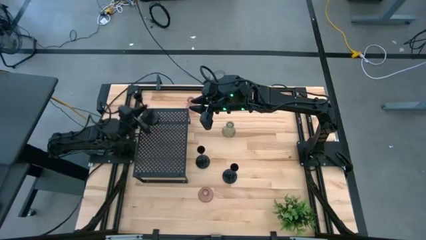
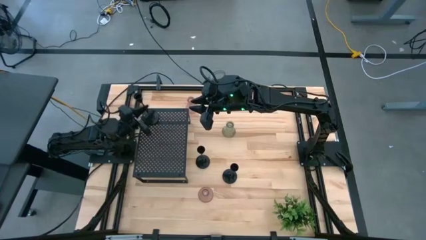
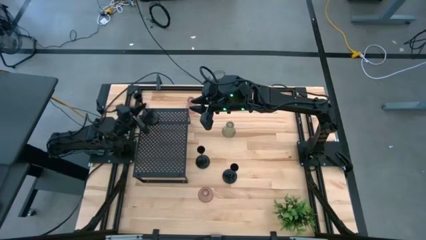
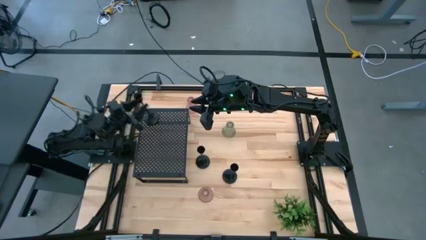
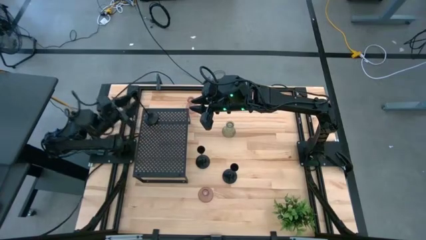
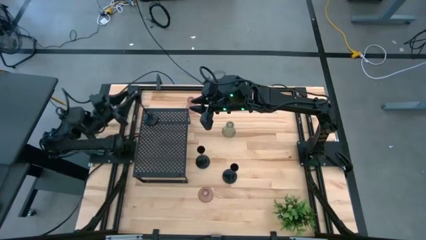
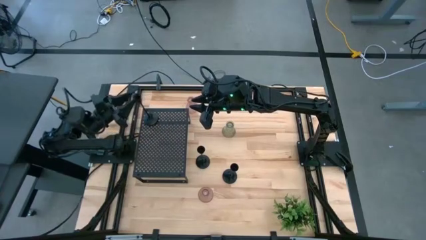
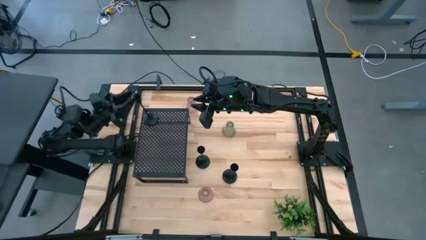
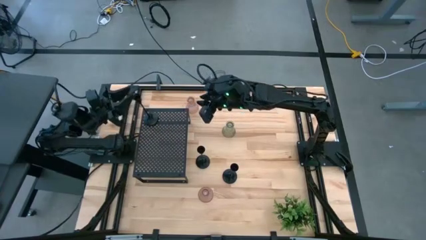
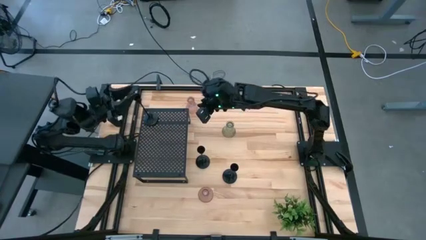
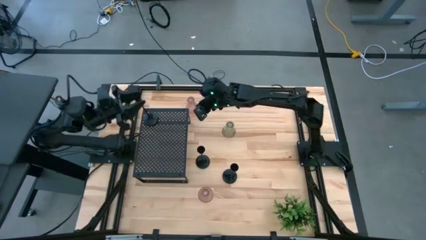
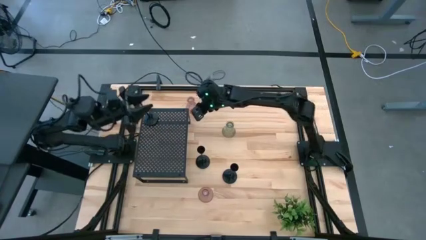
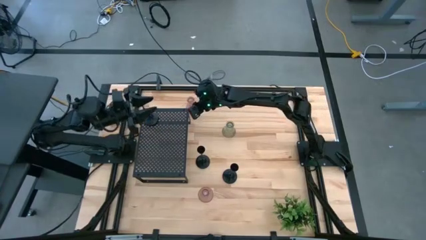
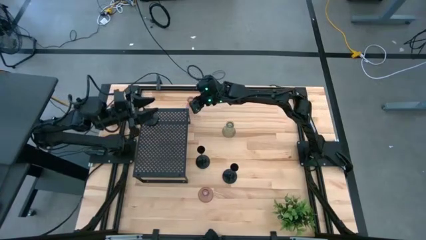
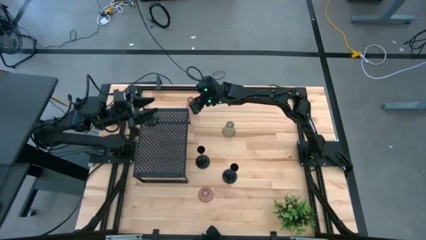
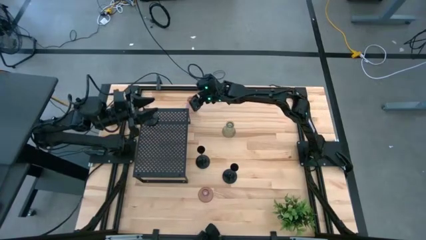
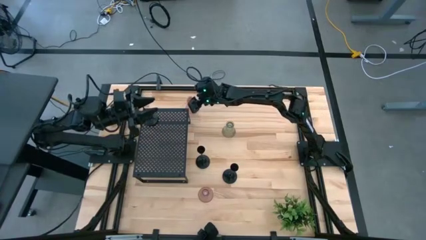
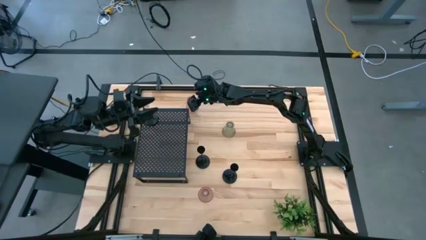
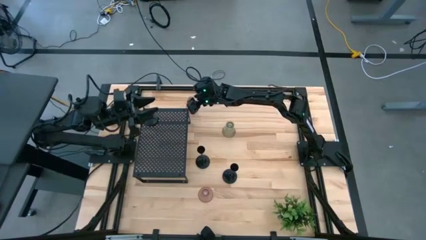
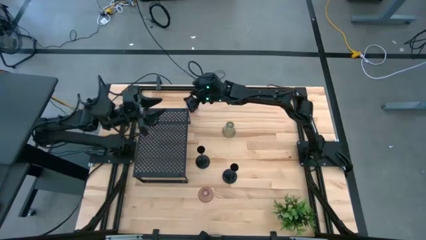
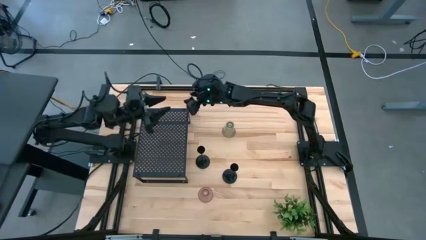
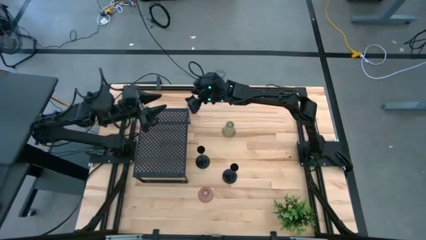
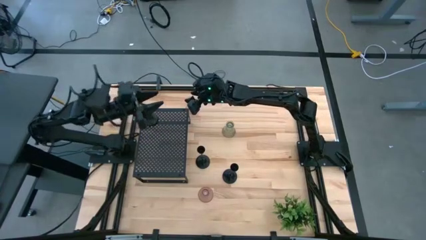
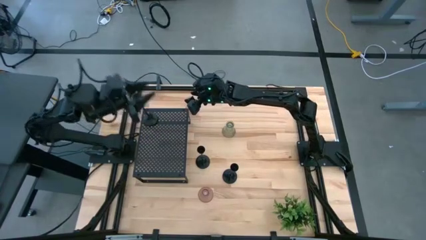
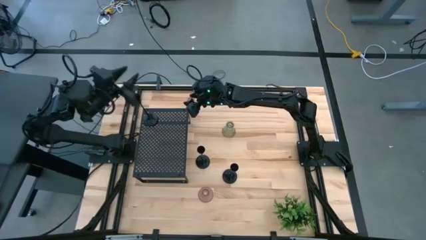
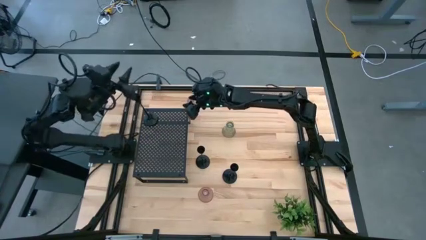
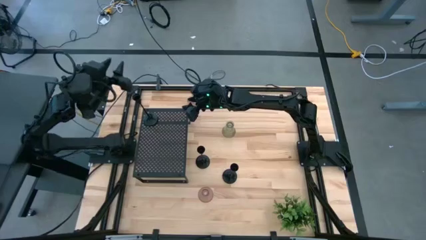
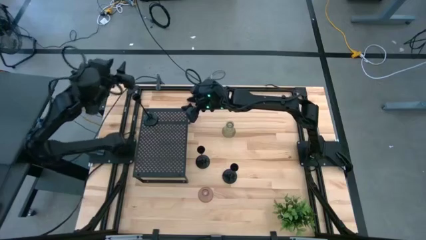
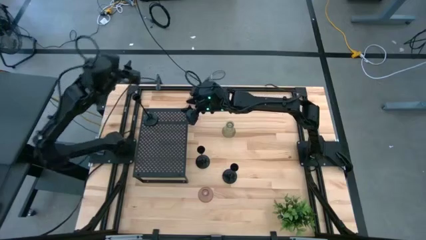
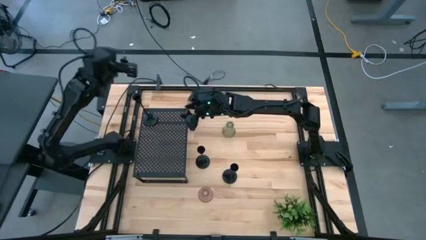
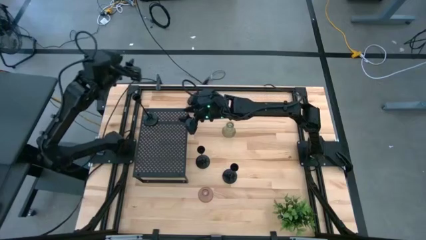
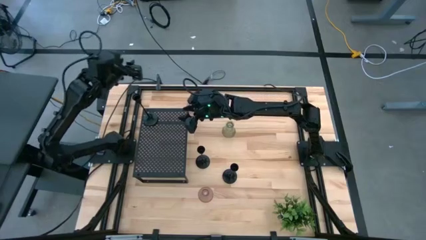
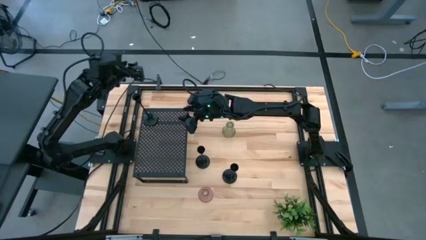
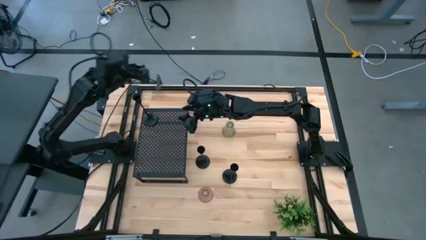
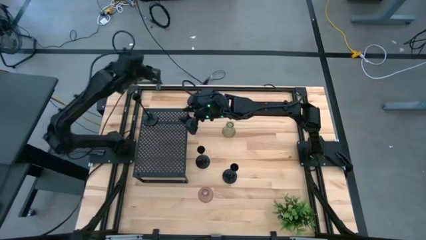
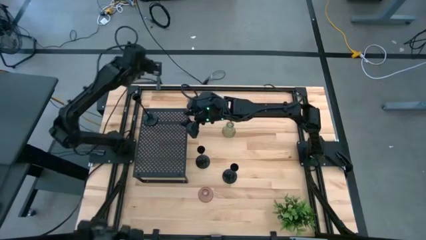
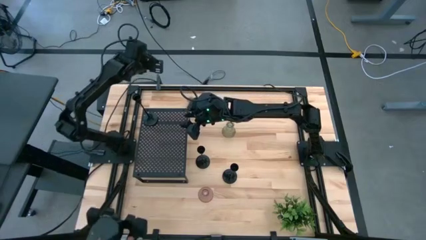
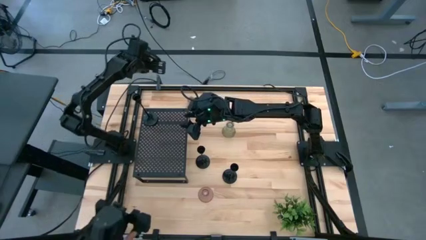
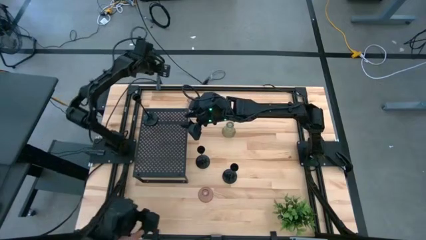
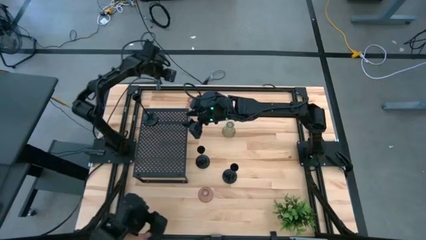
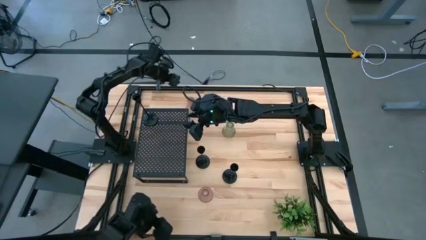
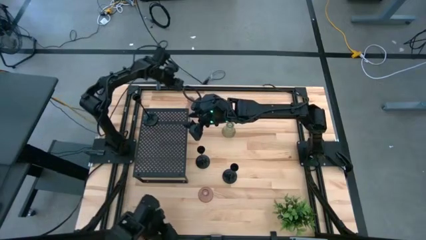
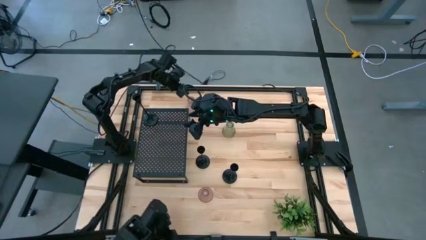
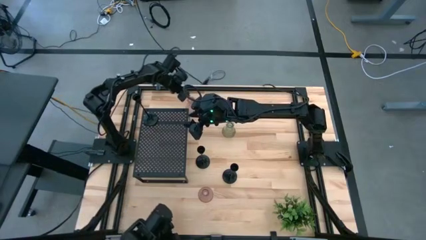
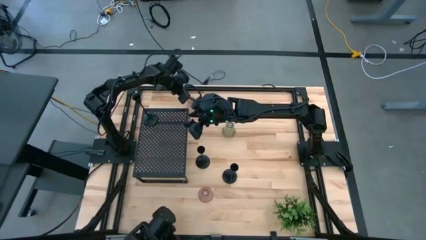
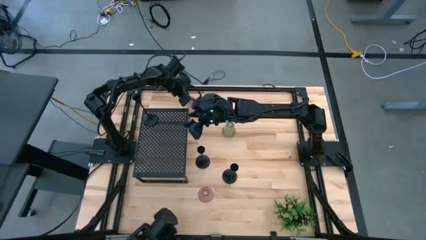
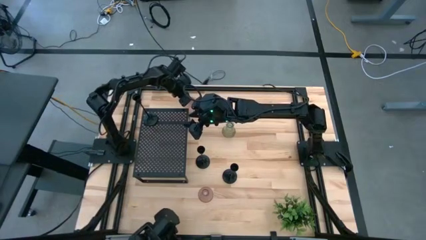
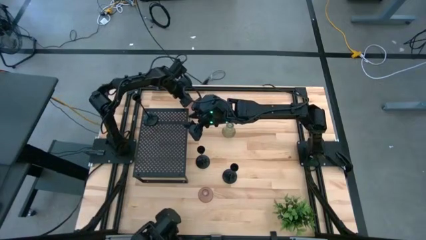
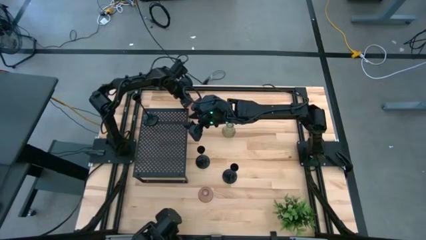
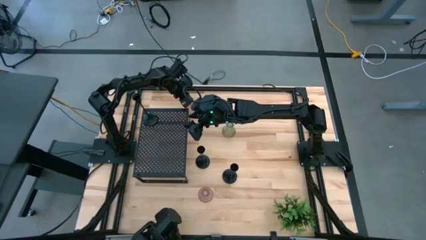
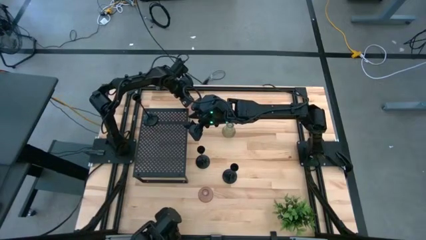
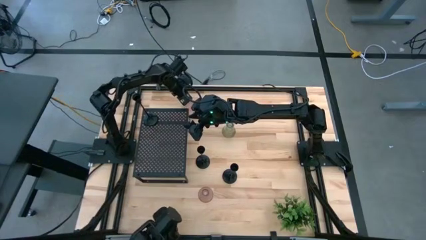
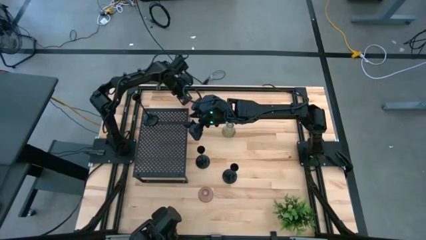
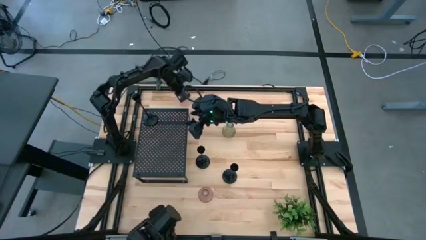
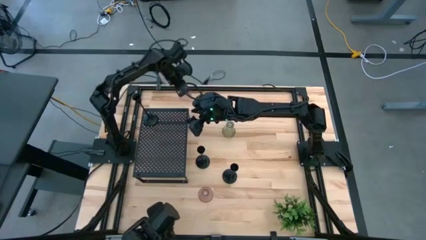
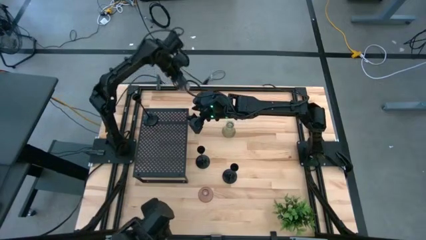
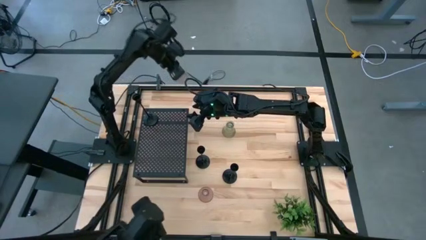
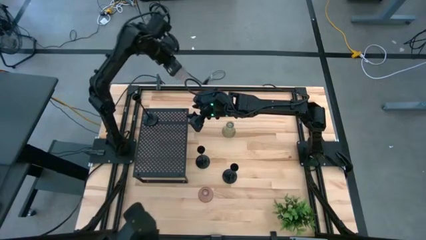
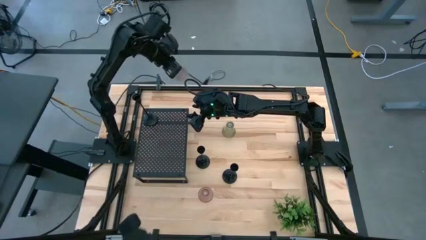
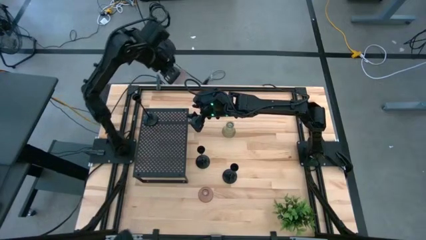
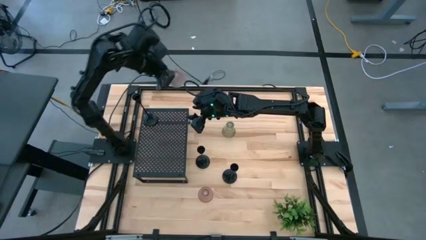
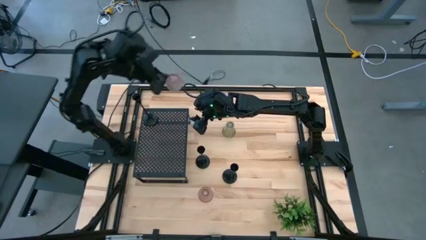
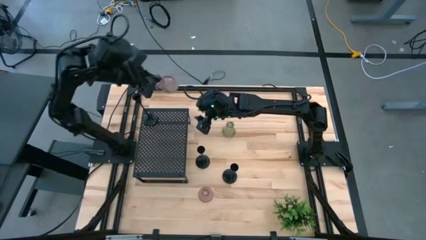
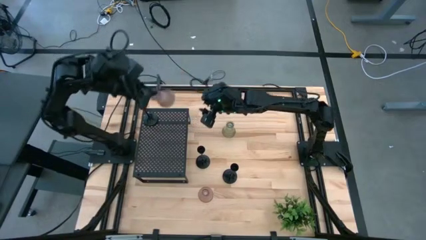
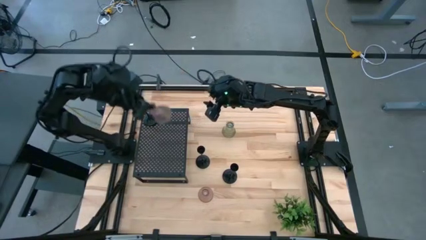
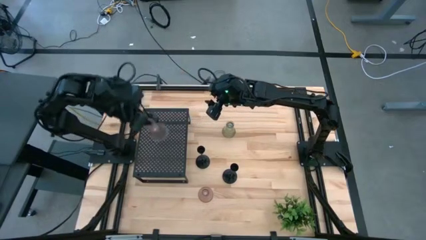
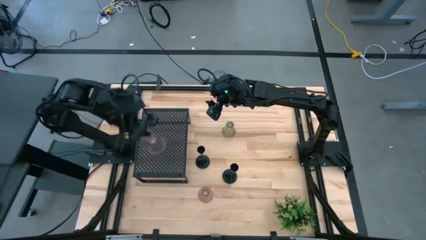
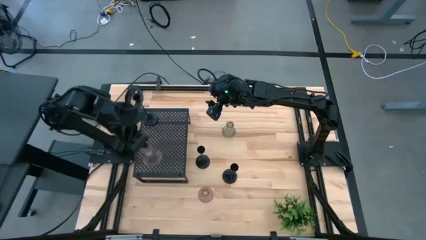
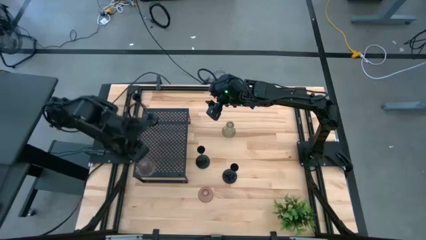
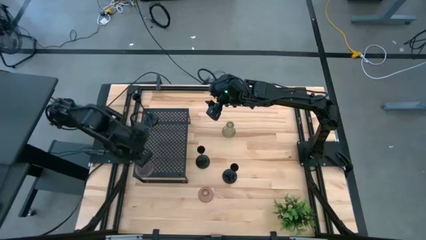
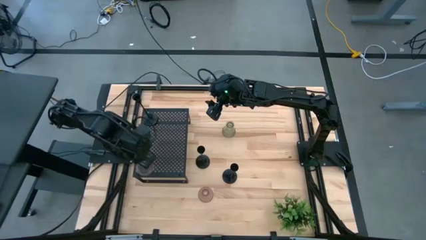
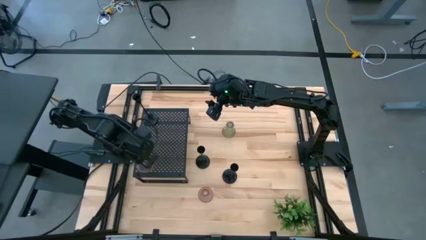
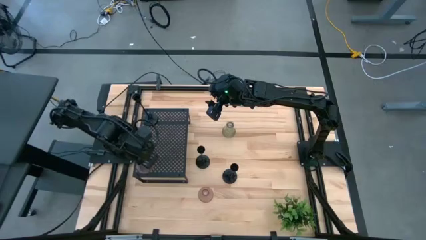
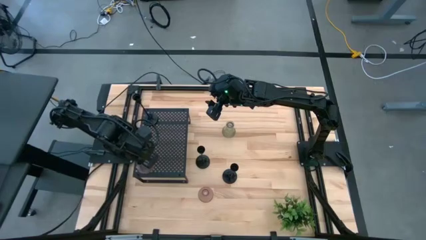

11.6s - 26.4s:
Task: Pick & Place candle stick holders
Put the top pink glass candle holder on the shelf
